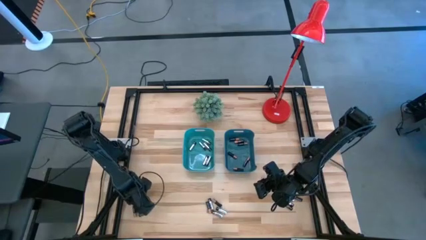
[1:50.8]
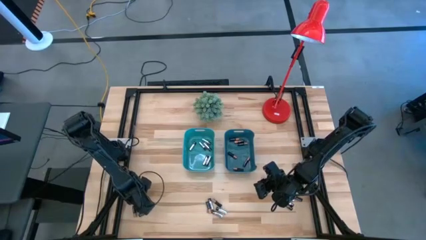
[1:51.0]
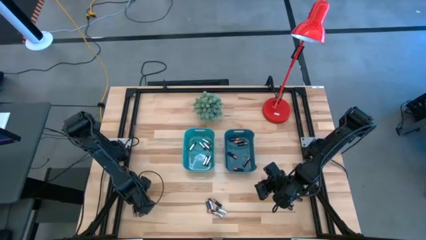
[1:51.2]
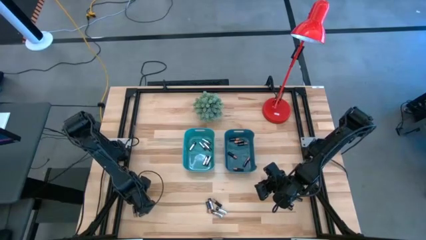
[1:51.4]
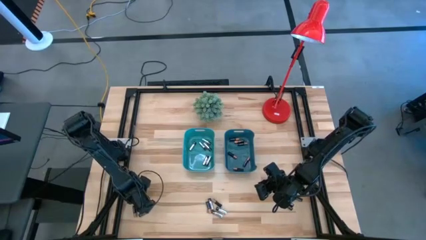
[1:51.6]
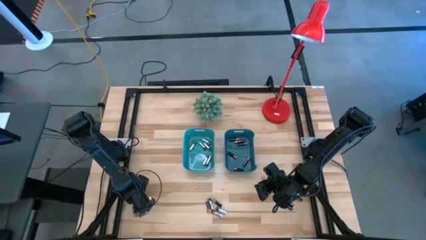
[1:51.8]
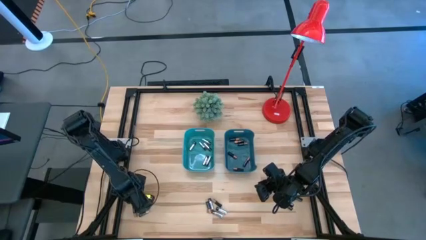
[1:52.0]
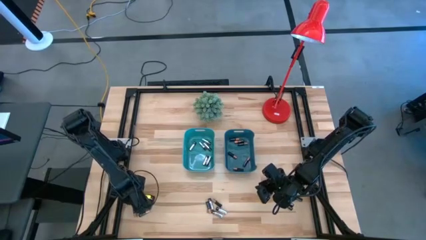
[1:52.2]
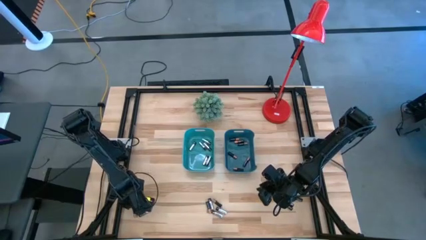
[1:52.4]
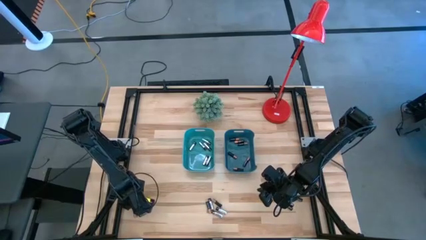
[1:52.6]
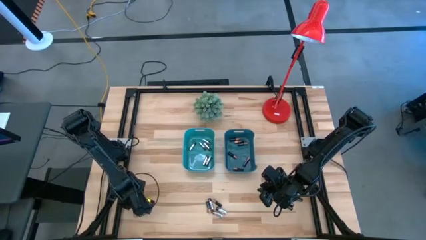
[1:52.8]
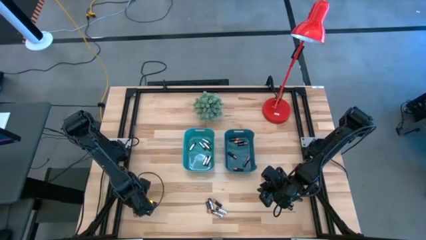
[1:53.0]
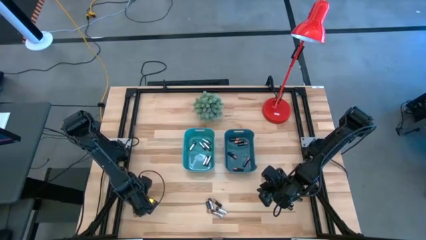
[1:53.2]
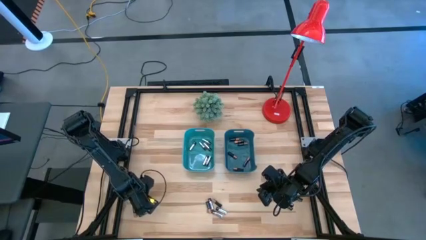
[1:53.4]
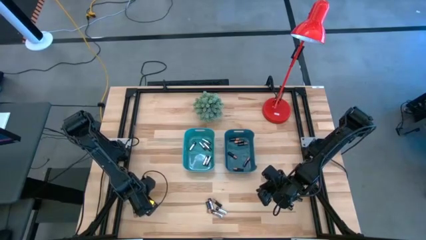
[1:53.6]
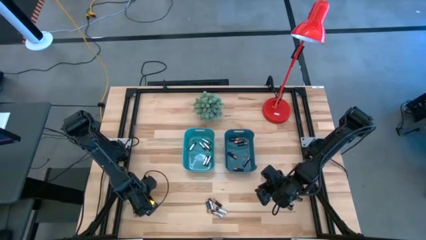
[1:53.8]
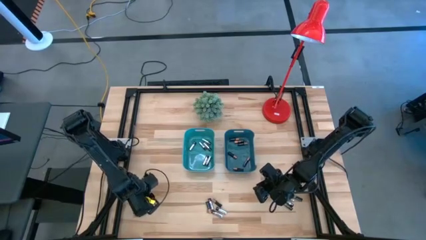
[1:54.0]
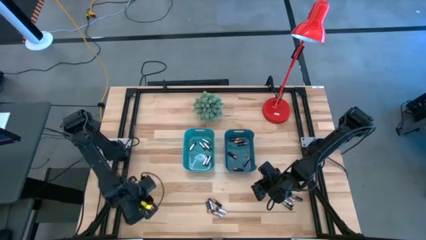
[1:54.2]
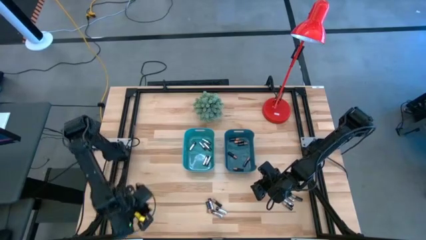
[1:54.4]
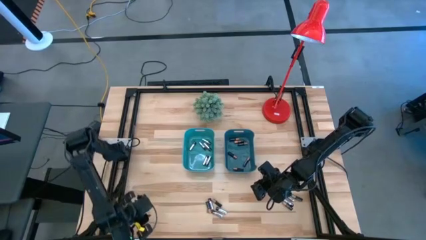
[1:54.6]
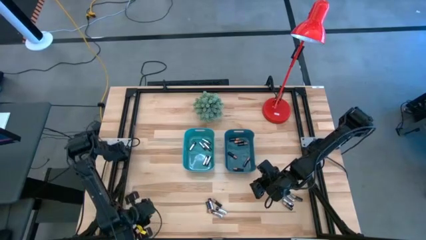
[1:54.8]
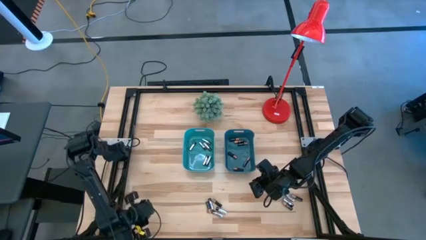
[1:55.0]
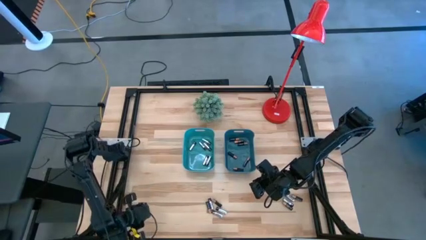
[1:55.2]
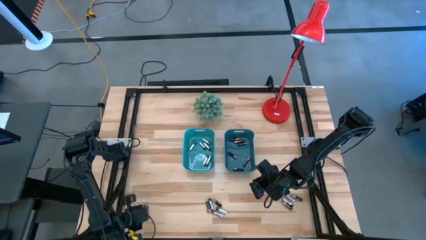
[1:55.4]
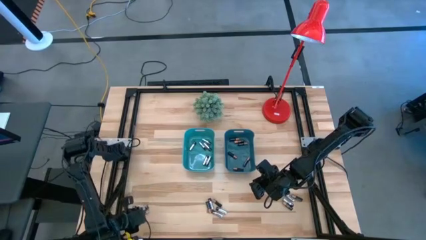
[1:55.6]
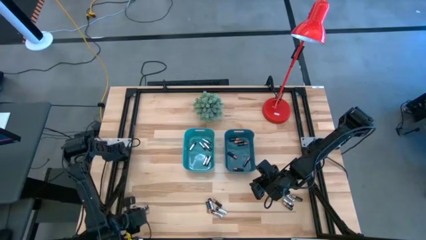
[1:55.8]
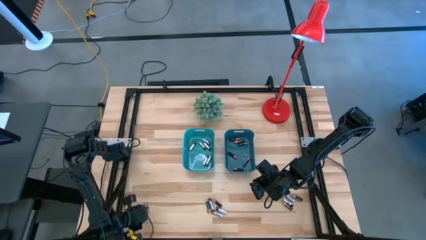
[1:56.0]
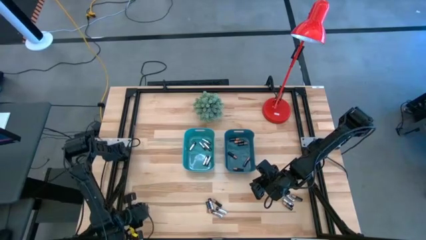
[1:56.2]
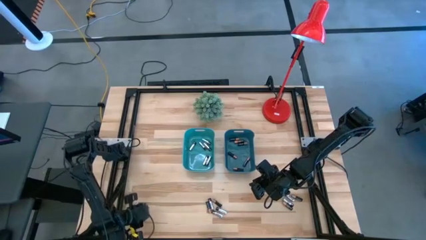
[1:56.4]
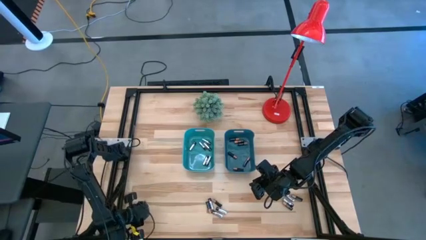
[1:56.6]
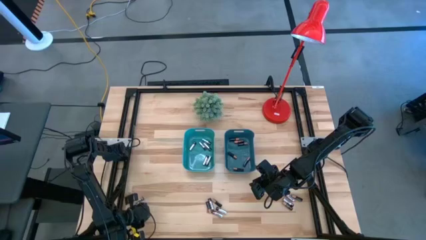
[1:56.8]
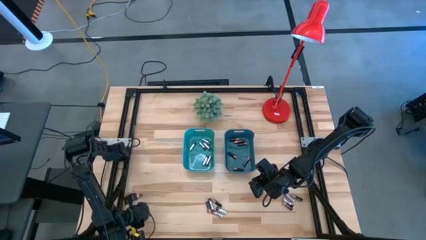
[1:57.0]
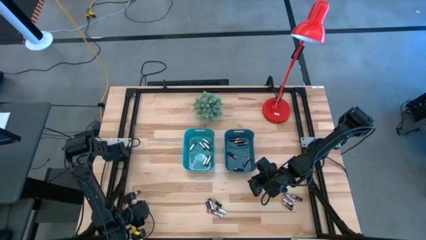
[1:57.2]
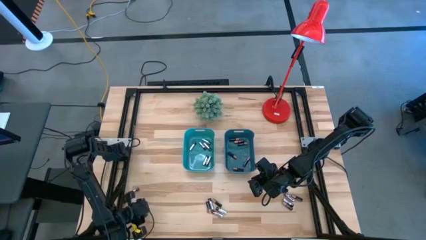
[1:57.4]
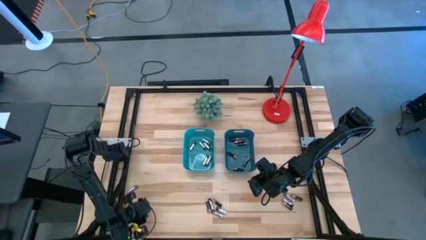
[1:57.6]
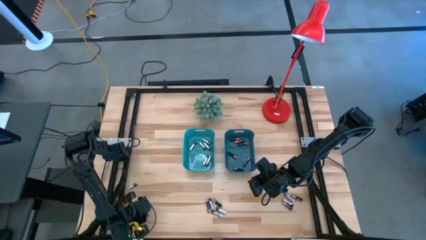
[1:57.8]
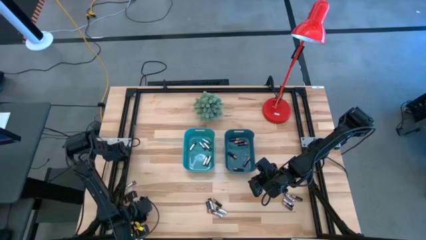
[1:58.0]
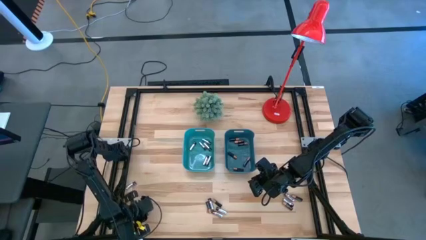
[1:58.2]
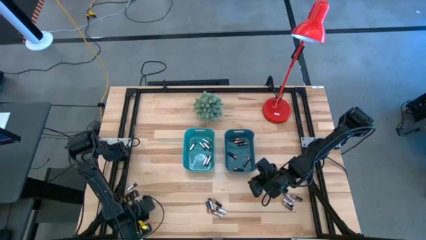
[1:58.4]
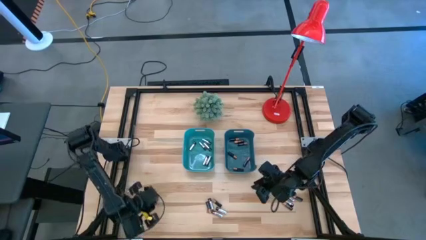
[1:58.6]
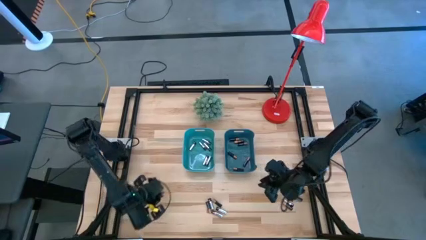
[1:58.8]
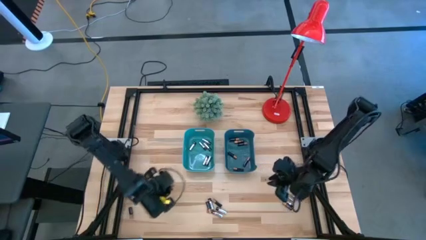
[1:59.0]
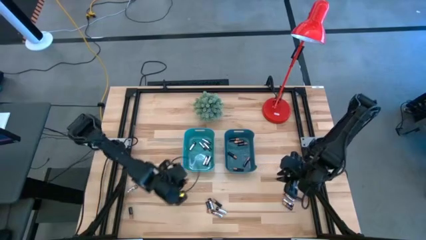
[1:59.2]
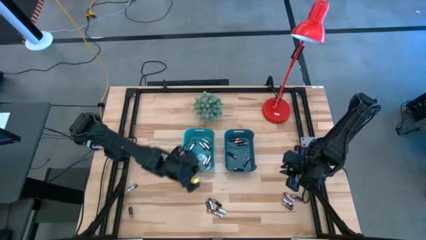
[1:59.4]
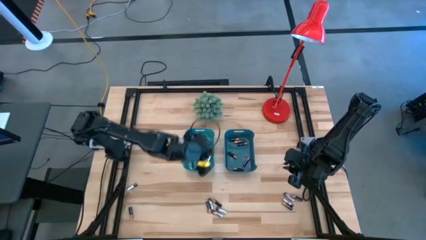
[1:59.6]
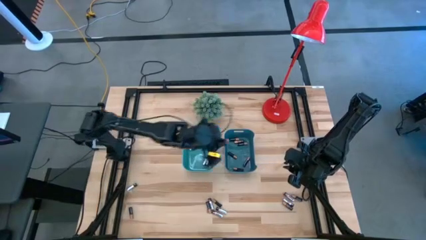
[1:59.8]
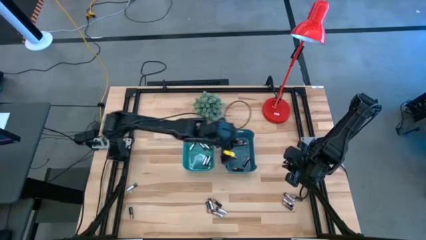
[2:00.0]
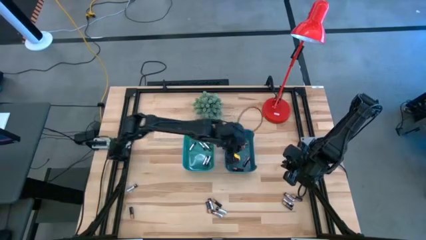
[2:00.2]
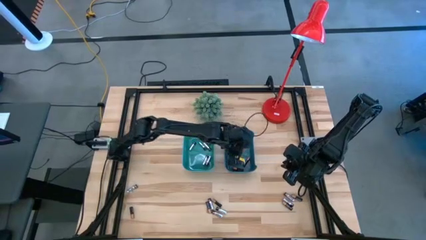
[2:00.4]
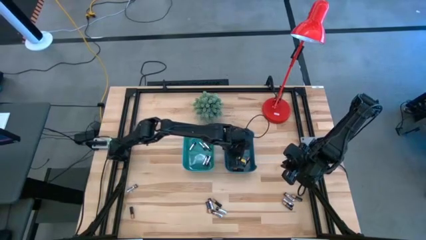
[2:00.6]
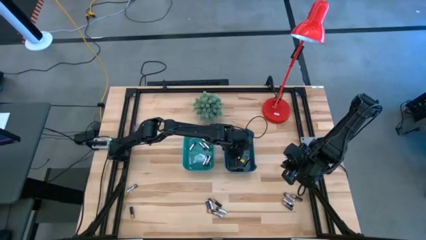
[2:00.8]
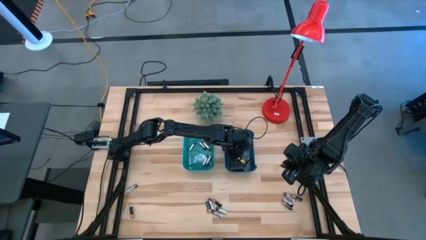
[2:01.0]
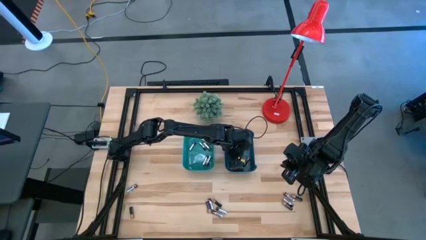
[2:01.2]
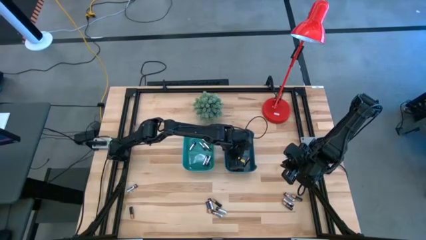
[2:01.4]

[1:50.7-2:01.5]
Task: Sort batteries
Put the black battery into the blue bin

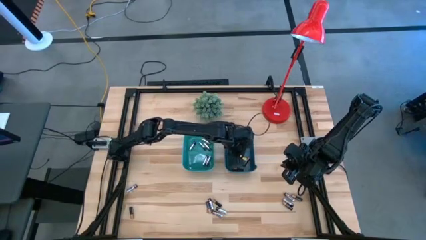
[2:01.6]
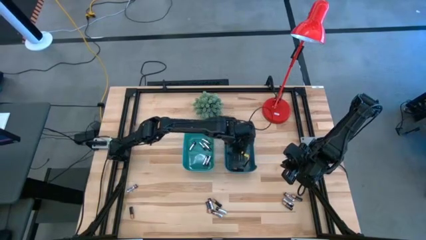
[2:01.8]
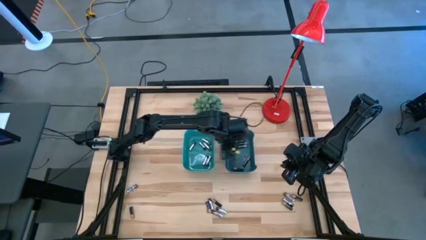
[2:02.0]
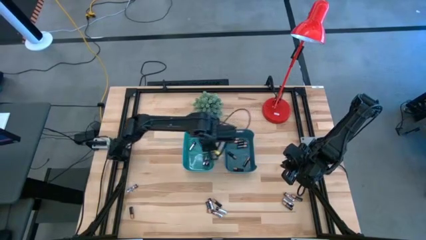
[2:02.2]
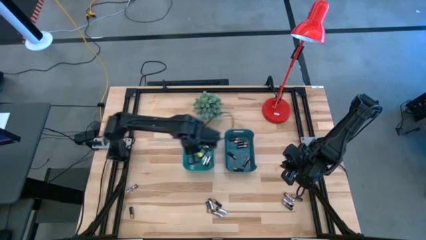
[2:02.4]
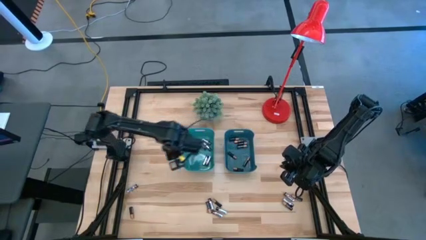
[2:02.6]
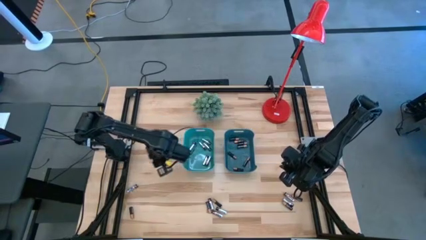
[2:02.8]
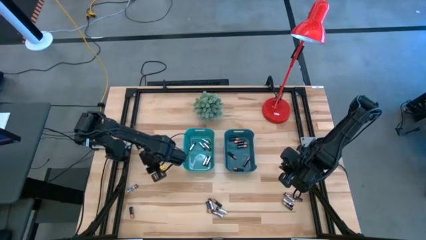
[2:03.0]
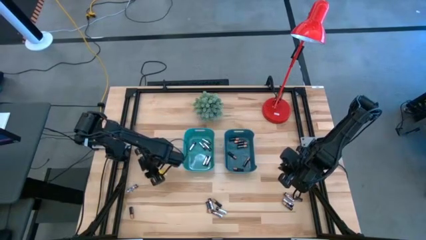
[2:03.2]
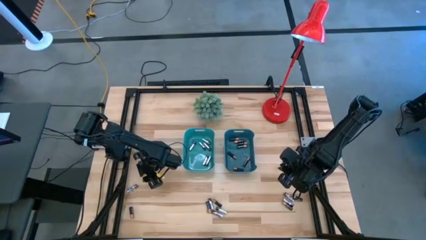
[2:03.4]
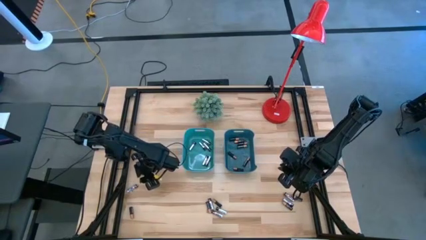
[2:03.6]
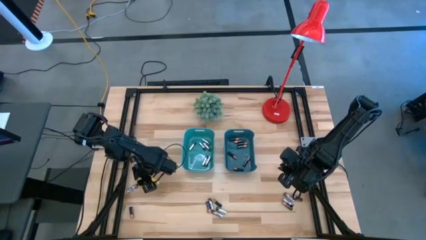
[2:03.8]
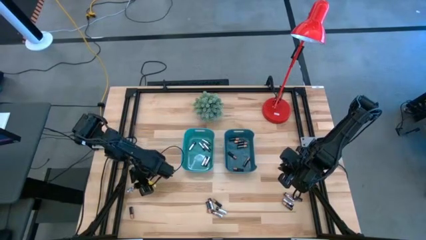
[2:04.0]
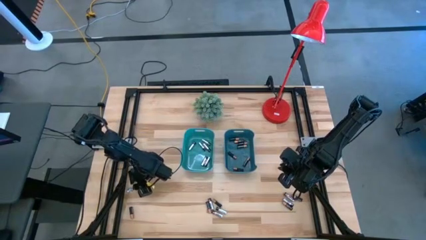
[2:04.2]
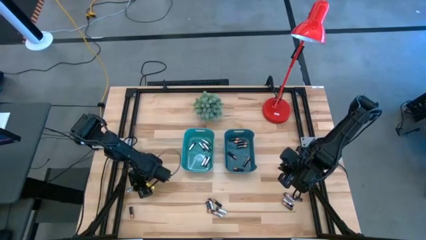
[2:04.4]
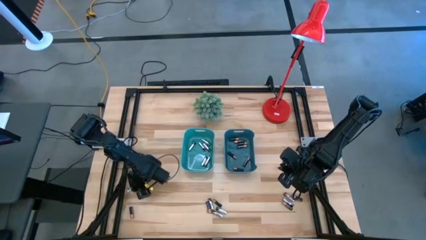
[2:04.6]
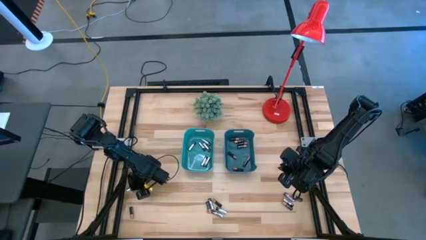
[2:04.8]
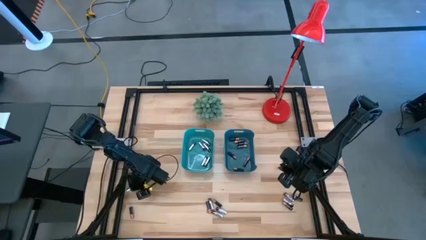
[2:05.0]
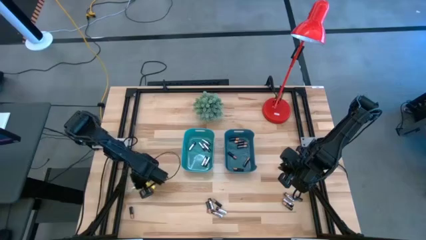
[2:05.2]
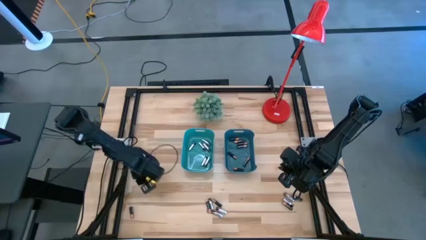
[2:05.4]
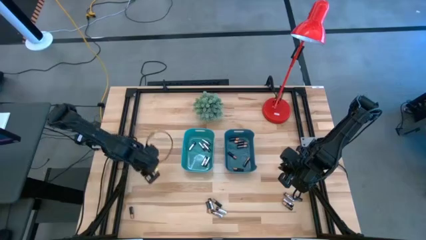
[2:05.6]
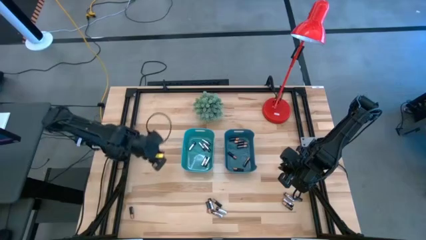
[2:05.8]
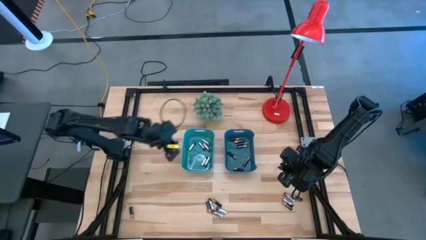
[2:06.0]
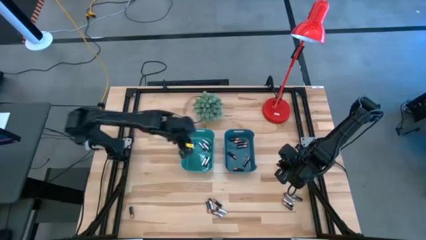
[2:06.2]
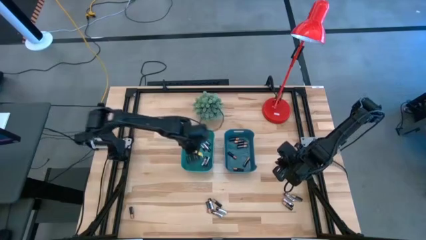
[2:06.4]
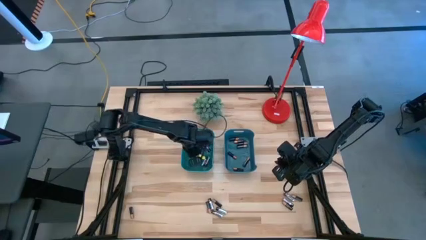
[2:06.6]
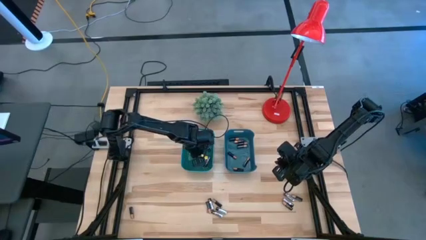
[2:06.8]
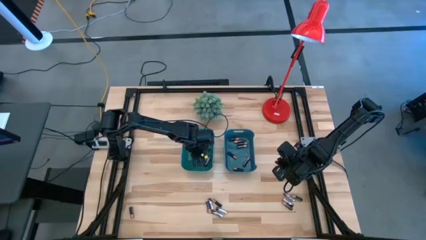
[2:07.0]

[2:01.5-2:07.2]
Put the silver battery into the green bin

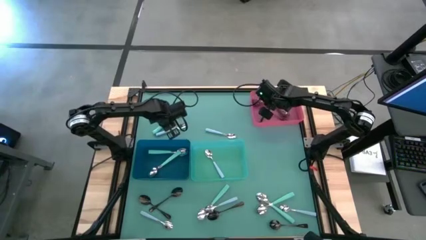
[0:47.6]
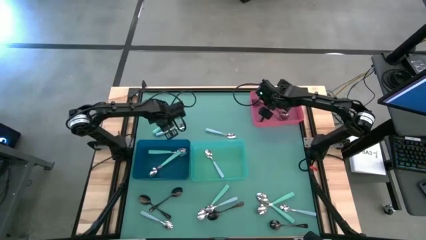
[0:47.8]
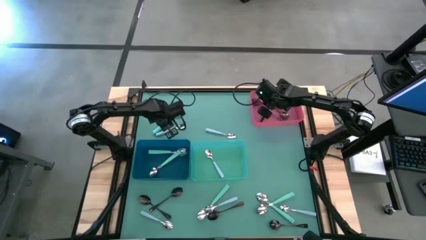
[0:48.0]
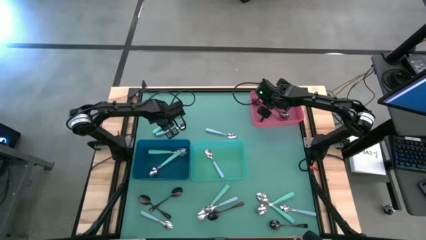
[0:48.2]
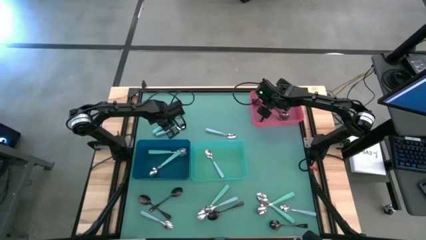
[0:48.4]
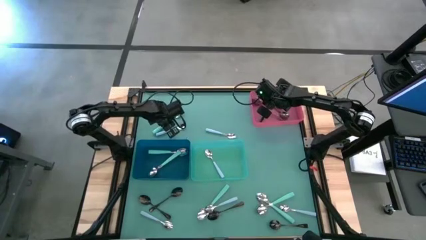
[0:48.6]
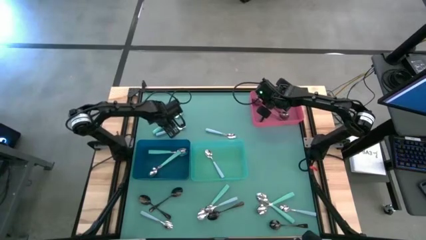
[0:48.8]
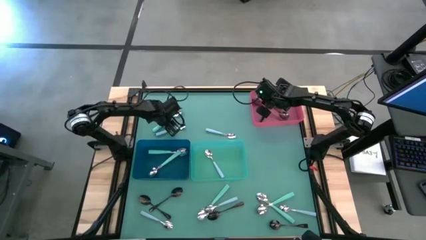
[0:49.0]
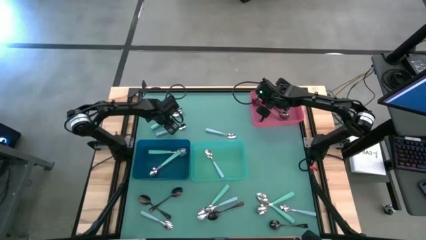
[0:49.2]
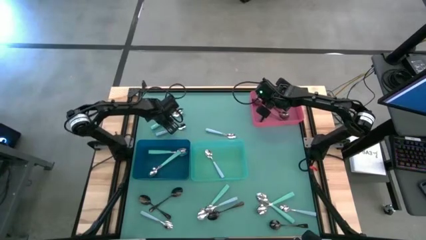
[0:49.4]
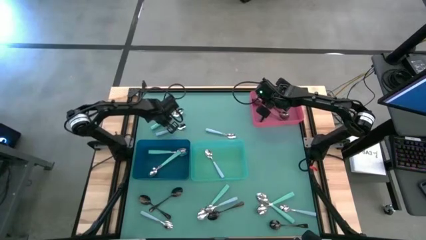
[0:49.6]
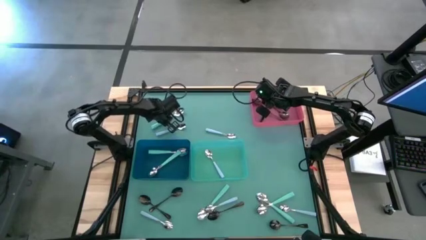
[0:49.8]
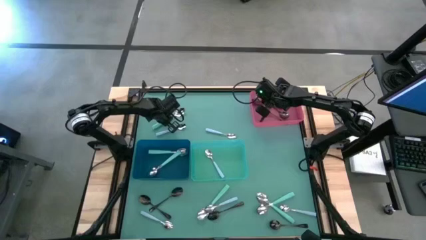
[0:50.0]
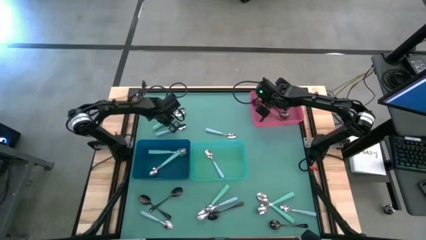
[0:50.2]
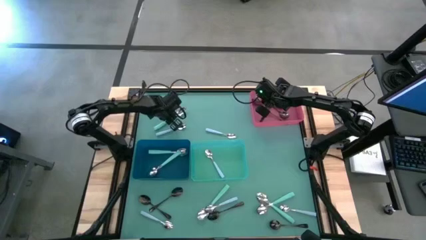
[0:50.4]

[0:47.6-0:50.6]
Task: Sort silverware by color (type)
Put the green spoon into the blue bin
